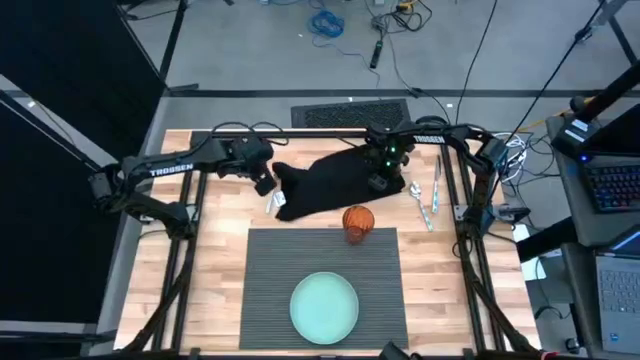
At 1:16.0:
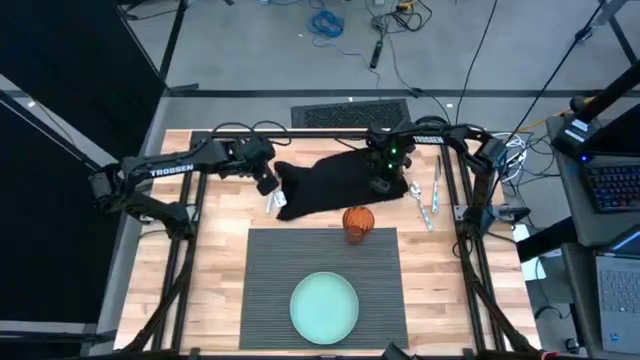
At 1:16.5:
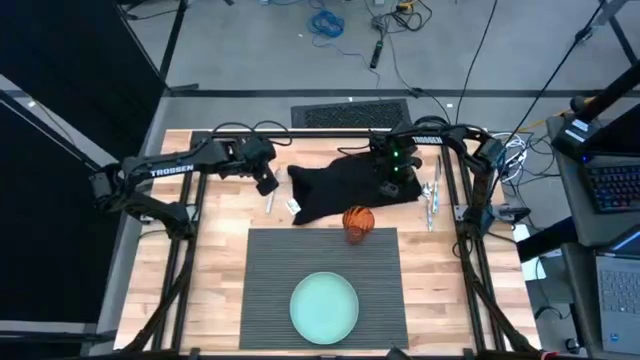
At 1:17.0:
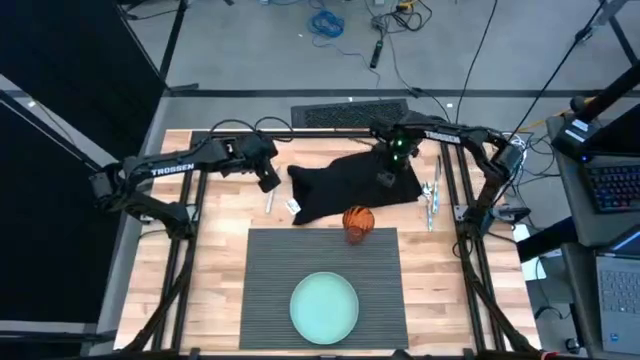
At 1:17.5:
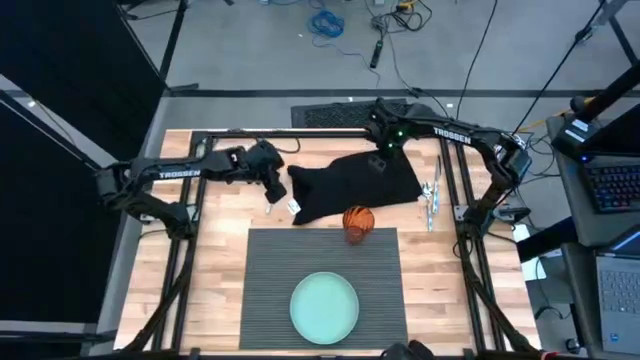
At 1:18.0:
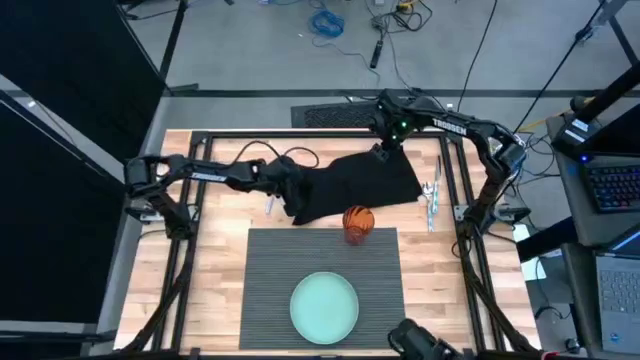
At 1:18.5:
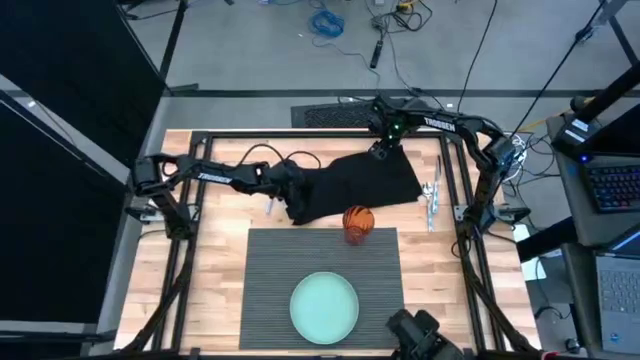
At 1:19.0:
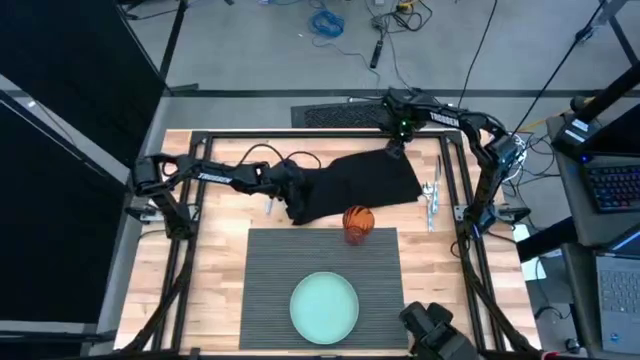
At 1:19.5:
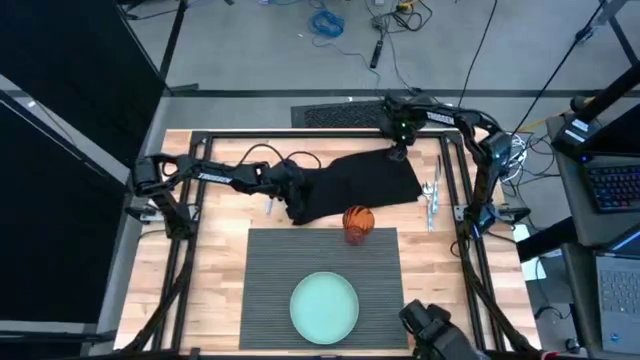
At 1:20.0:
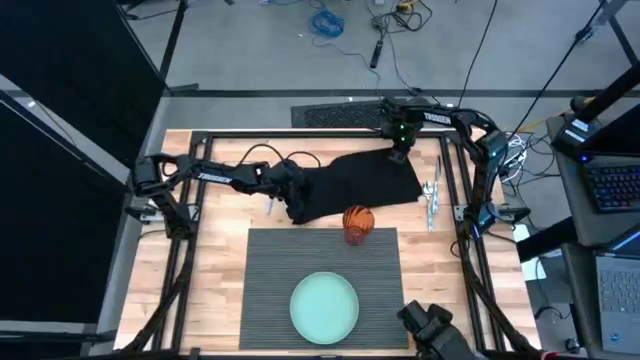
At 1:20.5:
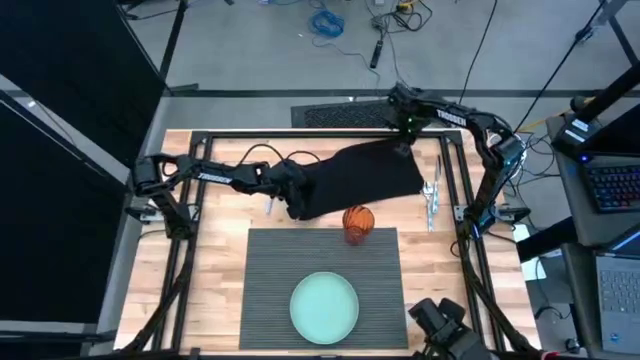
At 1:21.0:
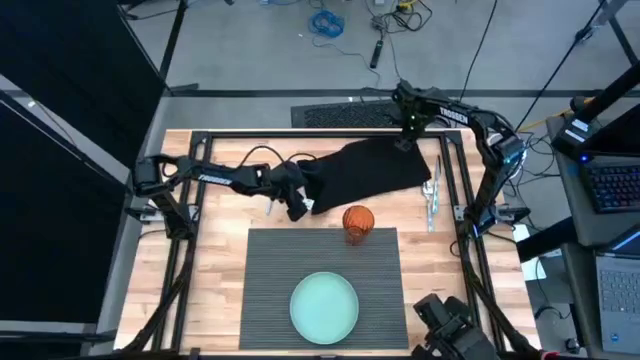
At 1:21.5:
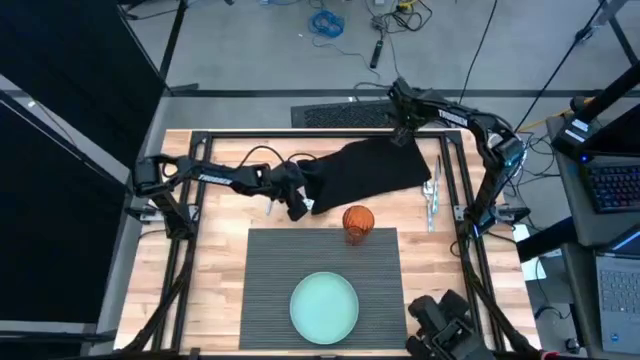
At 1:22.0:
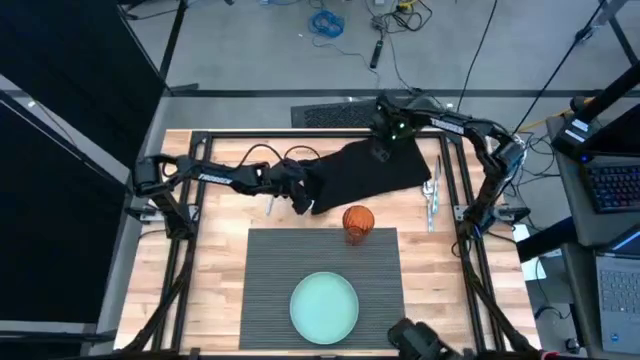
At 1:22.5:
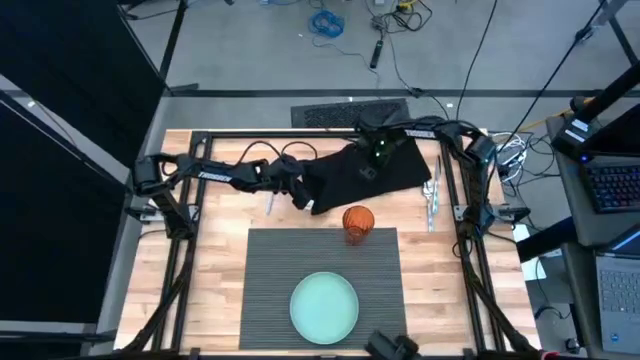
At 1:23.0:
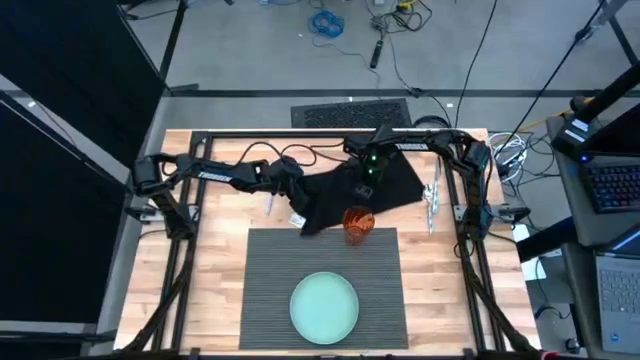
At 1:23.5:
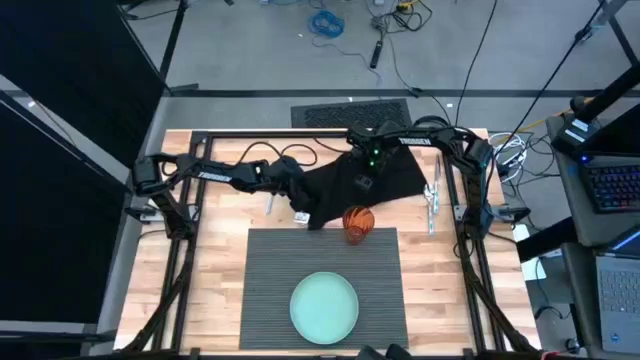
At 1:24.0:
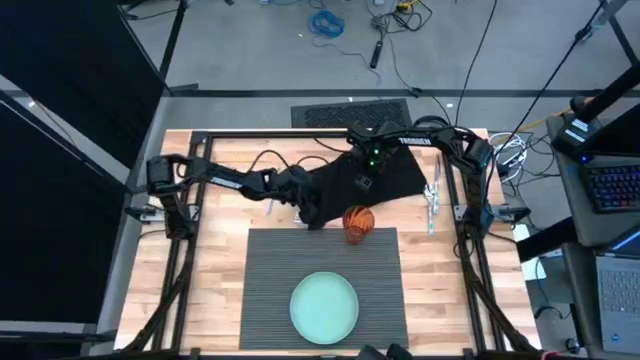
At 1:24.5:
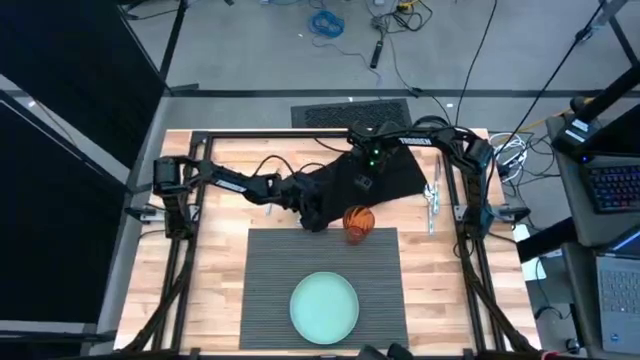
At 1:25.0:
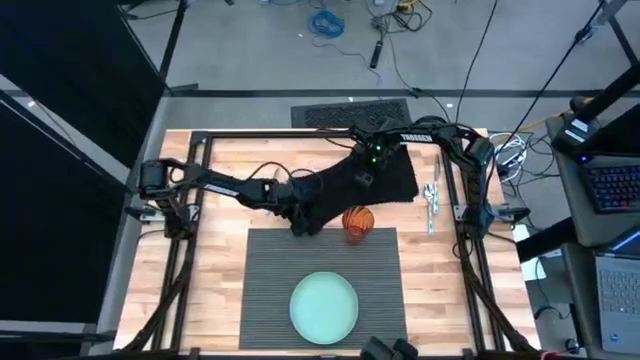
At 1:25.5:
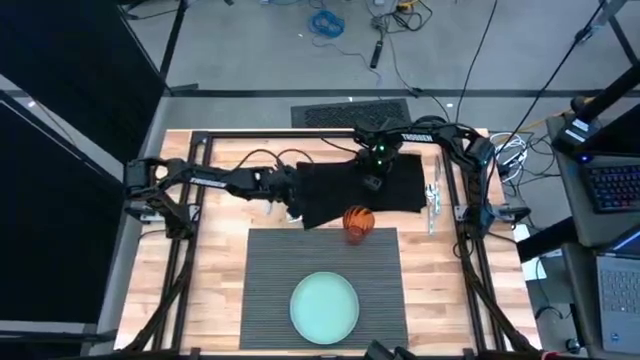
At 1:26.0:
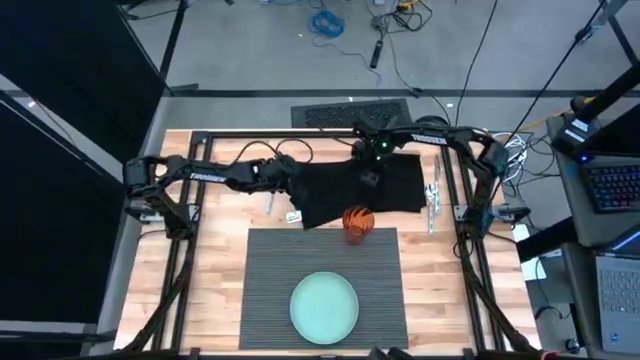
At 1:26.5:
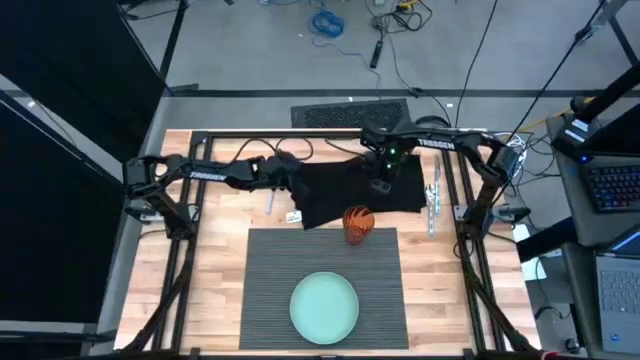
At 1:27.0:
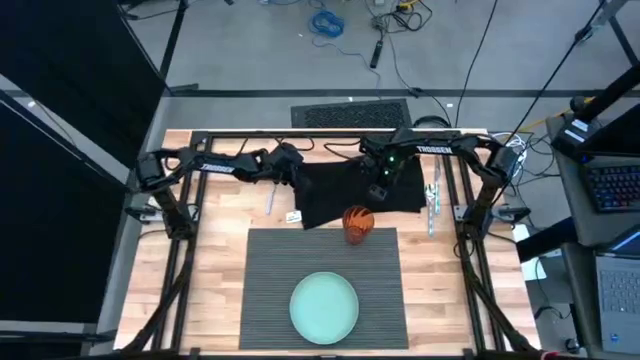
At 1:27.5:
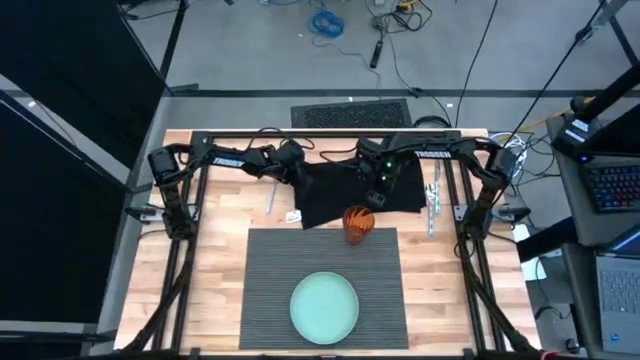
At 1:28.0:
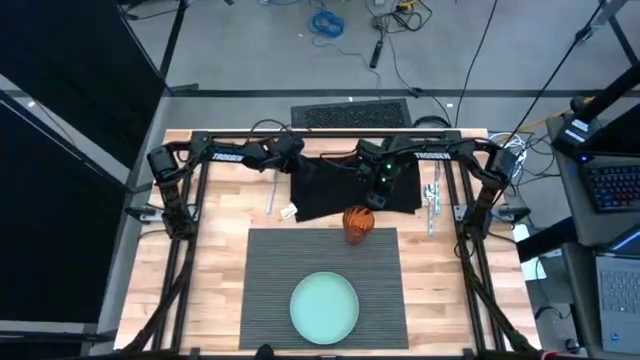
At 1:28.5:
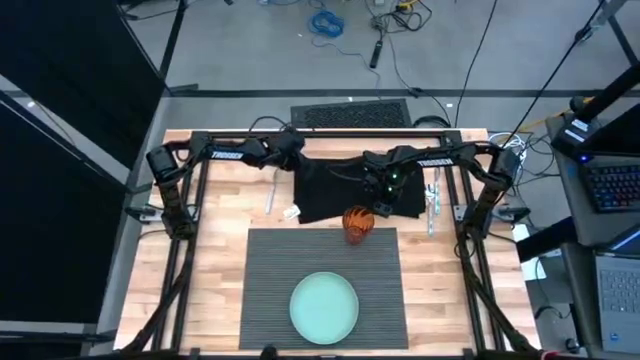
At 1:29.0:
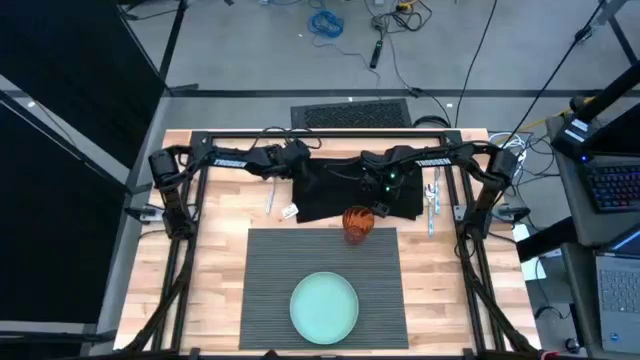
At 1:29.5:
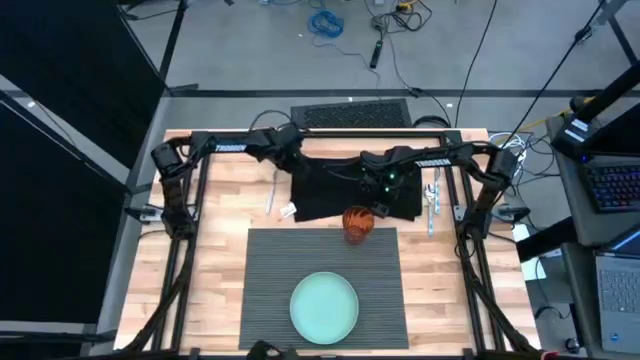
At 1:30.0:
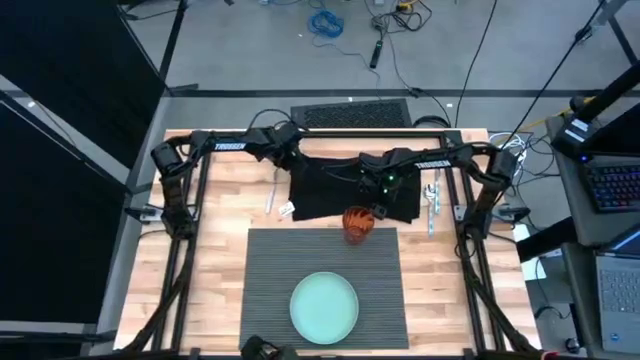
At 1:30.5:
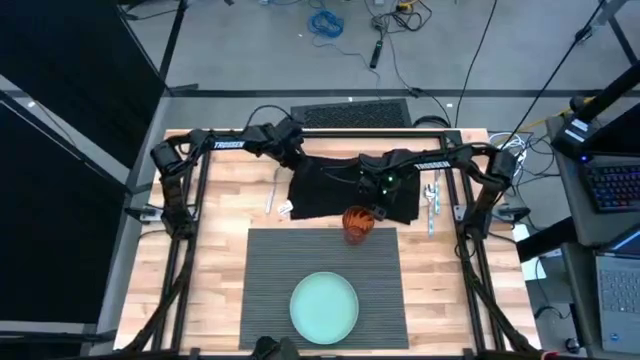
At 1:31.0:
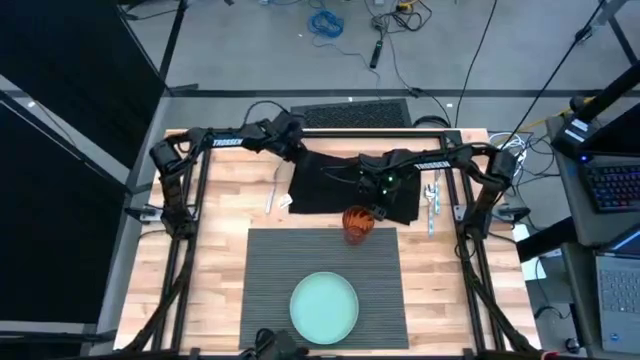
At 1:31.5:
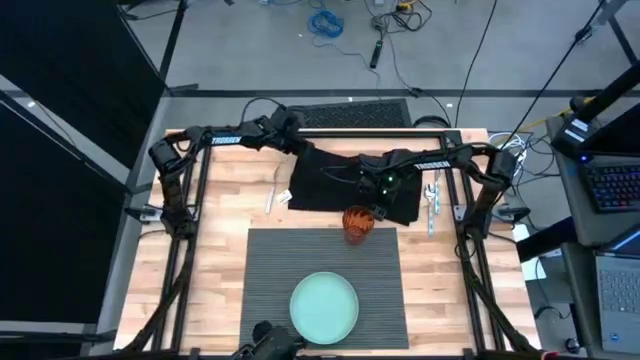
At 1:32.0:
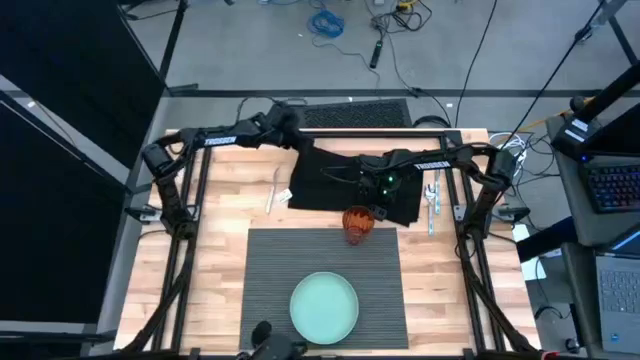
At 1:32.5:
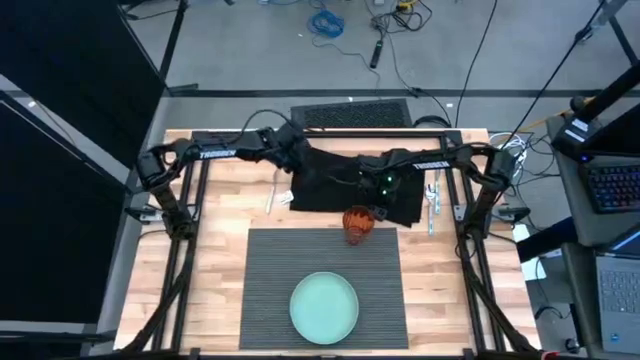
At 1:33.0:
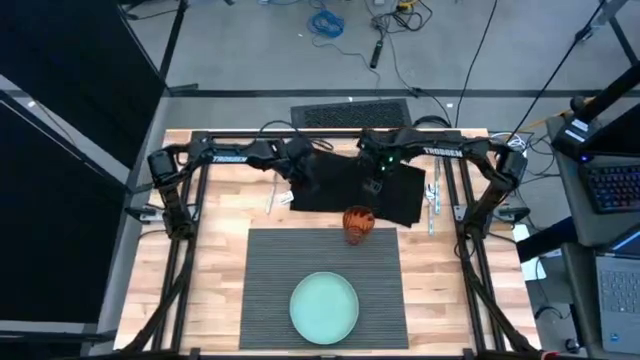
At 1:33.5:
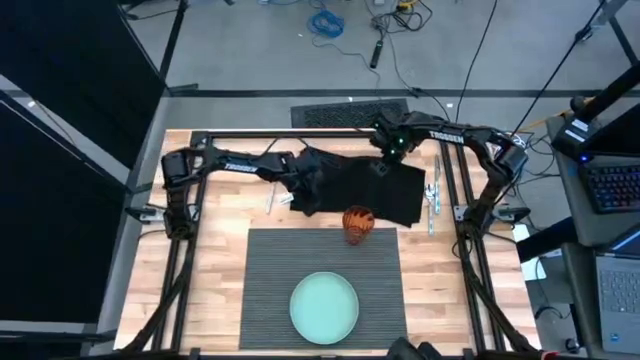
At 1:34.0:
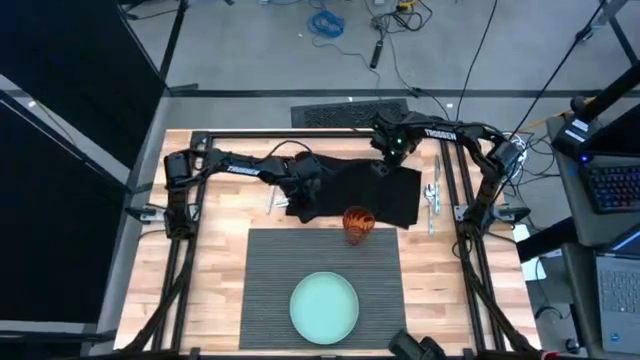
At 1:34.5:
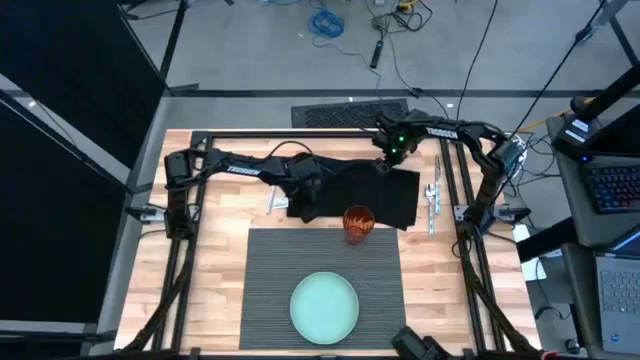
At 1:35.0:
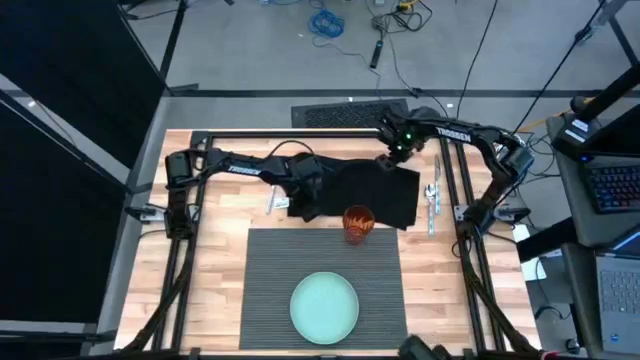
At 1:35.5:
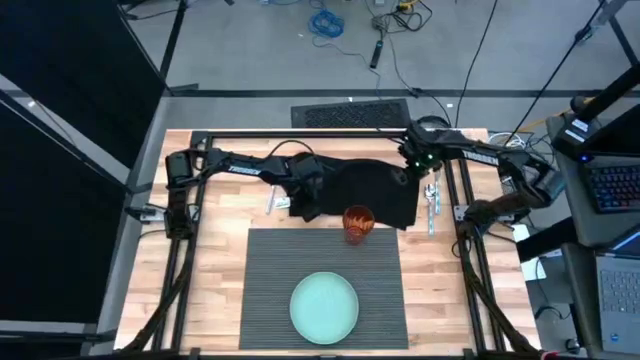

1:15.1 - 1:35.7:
Task: Set table place
Fold the black napkin

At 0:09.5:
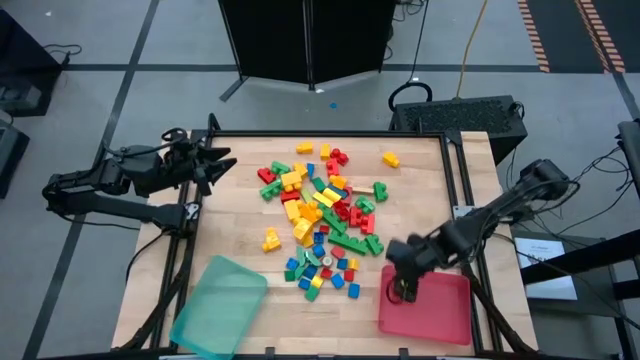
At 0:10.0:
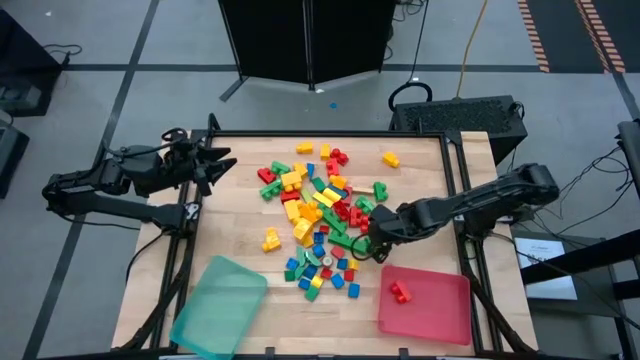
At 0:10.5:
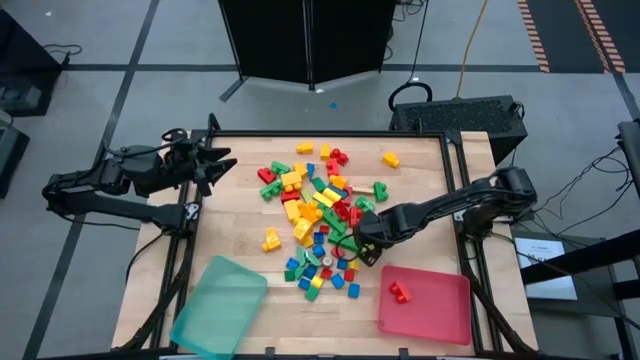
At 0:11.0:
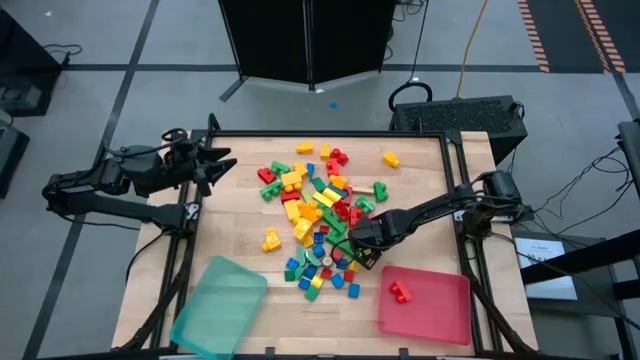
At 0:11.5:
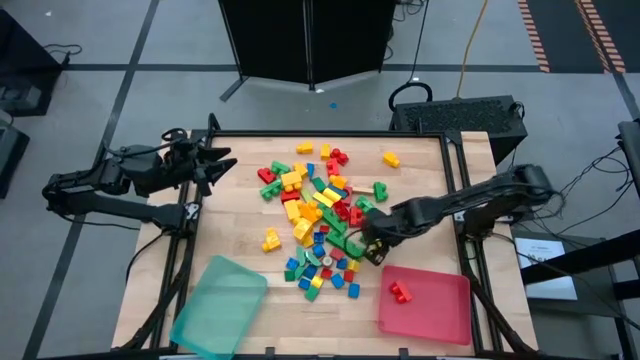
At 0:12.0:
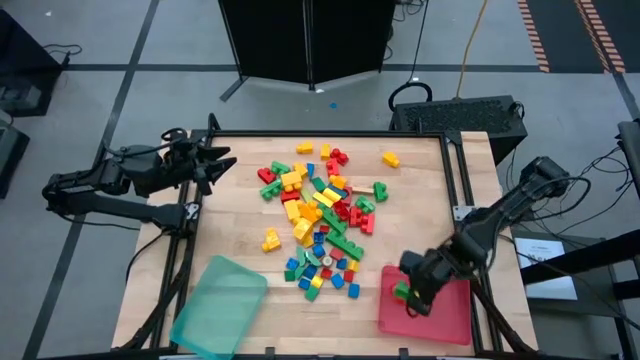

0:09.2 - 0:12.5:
Task: Sort blocks by size
Put the 2-stud green game piece into the pink bin
